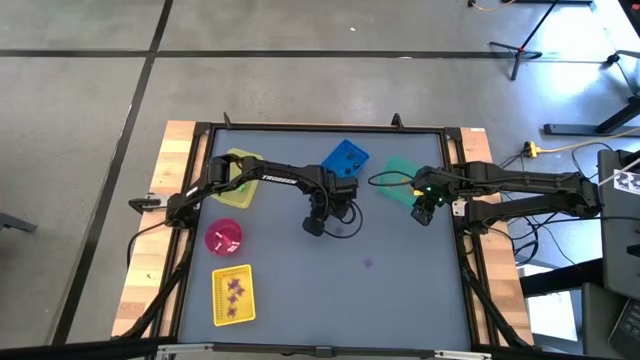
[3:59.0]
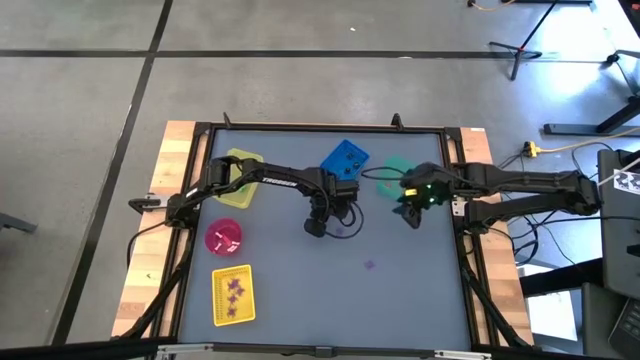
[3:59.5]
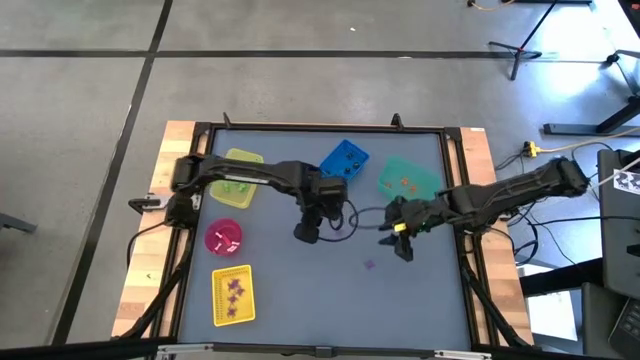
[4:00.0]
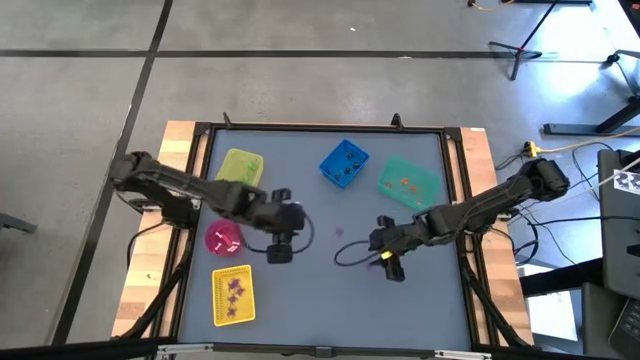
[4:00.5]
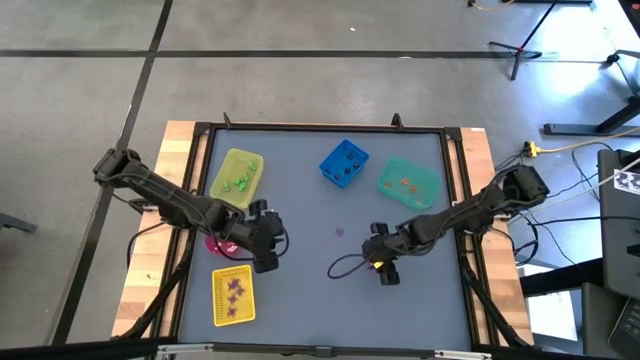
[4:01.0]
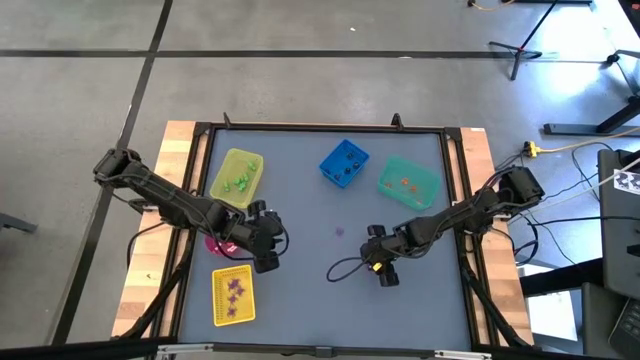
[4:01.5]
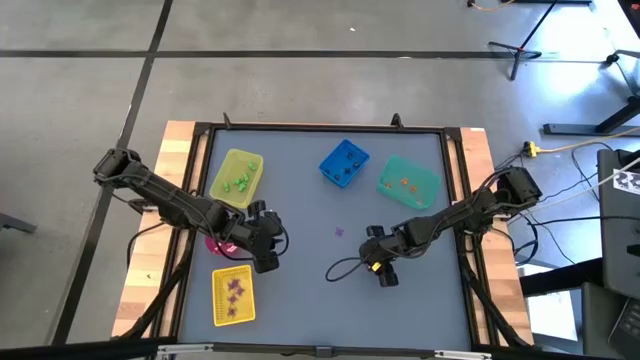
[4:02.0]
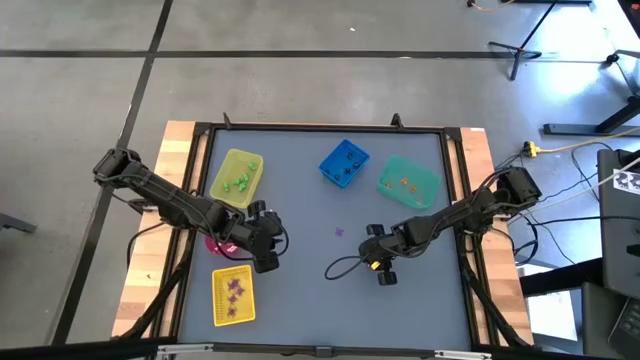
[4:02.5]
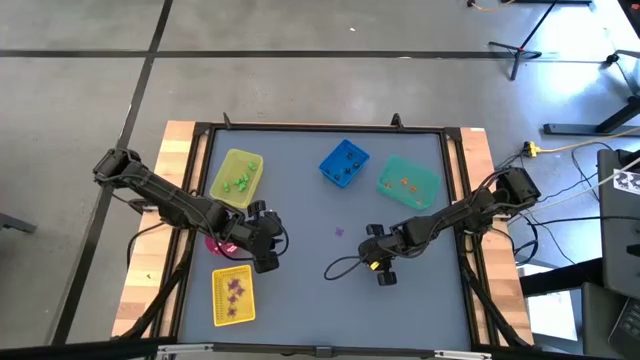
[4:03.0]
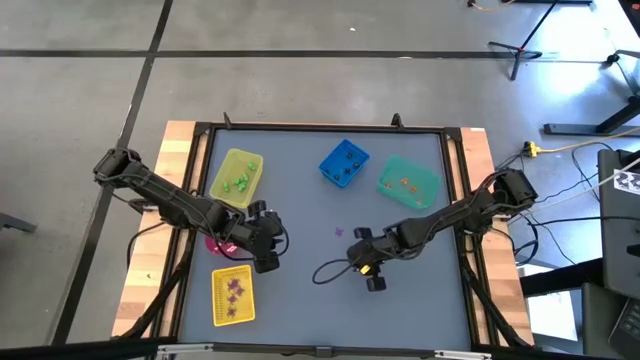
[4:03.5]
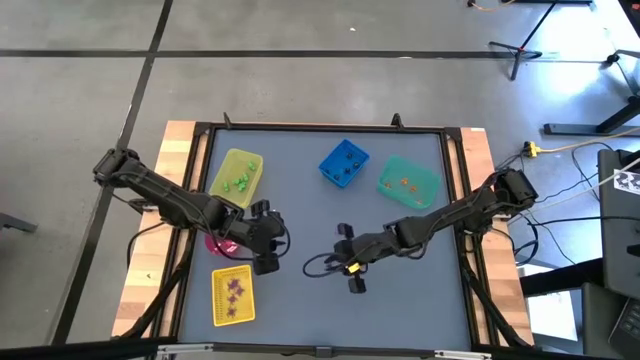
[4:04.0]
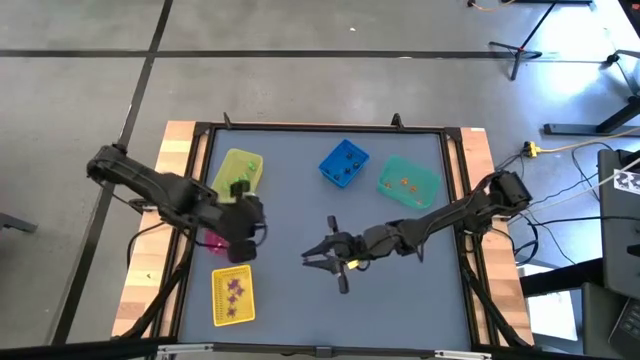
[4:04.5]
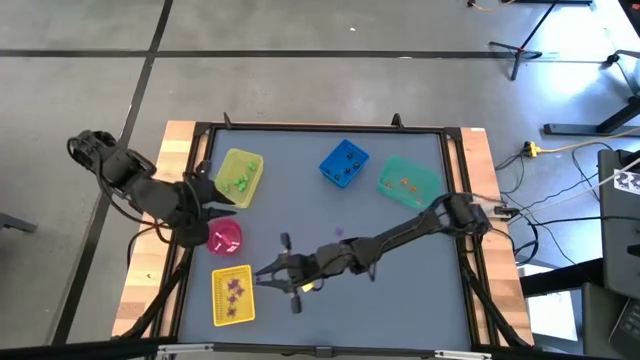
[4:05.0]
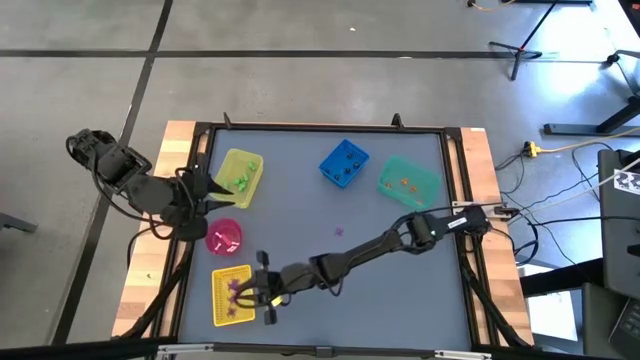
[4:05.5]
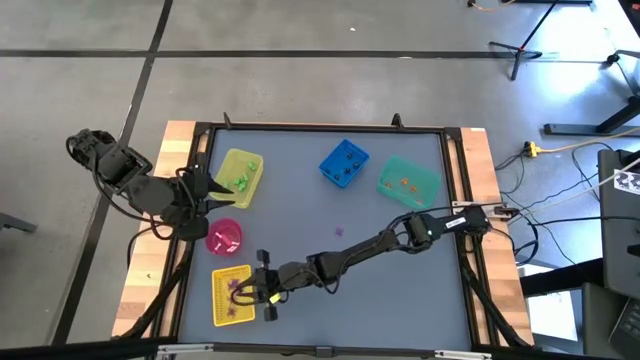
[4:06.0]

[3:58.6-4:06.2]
Task: Sort Halloween decoration
Put the purple spider toy into the yellow basket

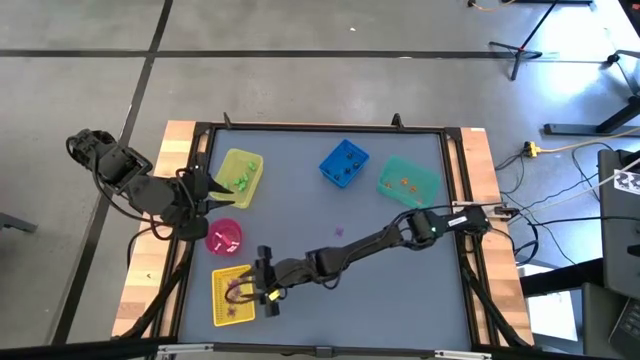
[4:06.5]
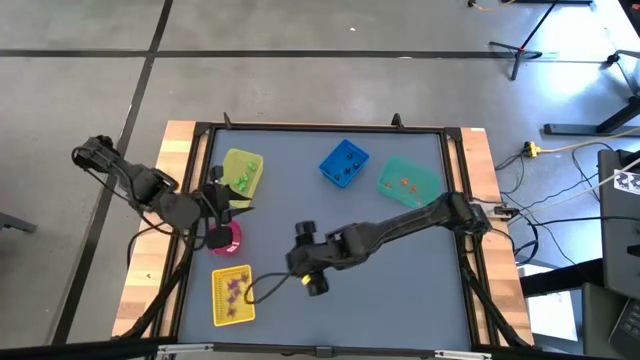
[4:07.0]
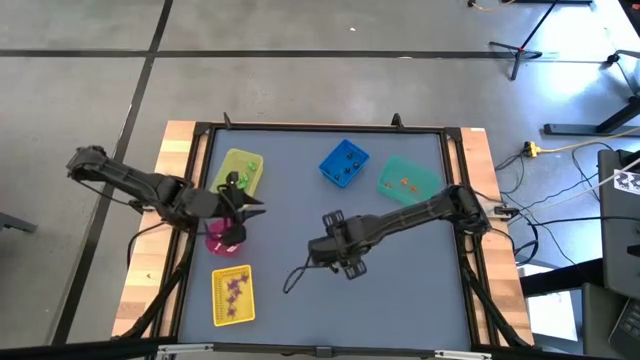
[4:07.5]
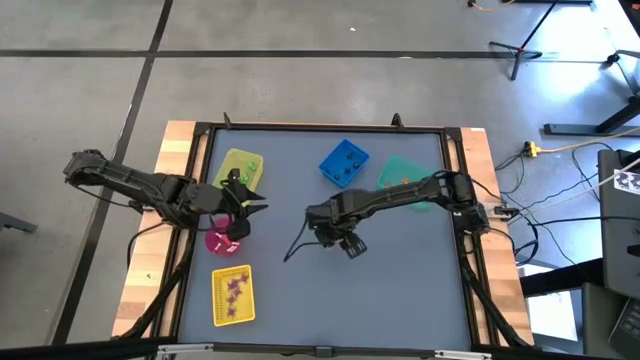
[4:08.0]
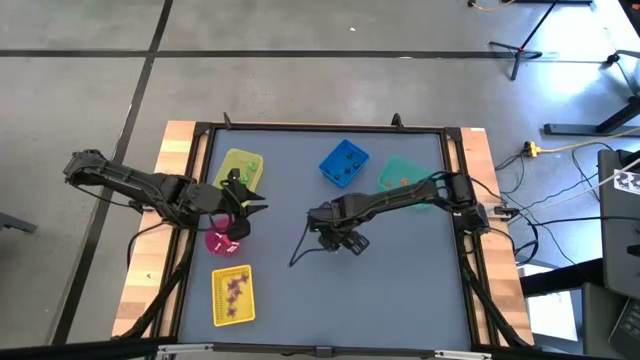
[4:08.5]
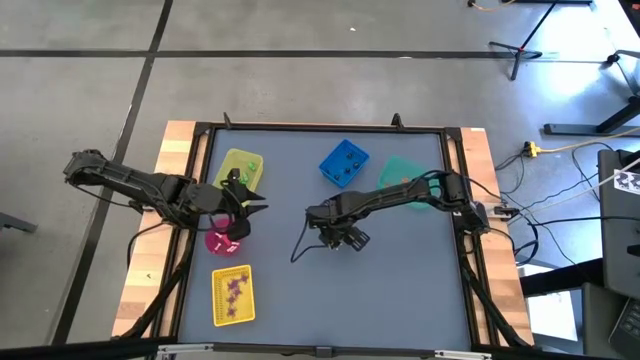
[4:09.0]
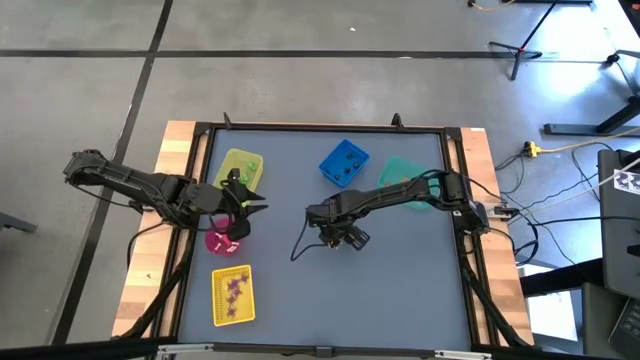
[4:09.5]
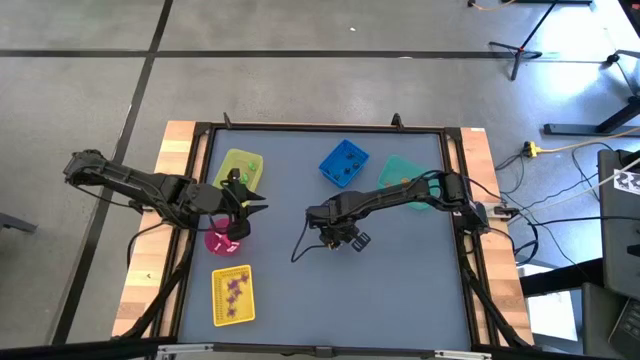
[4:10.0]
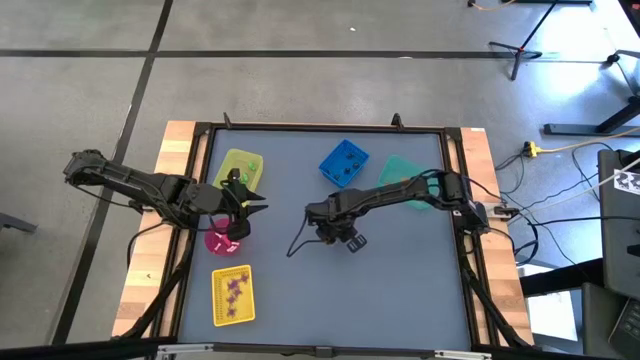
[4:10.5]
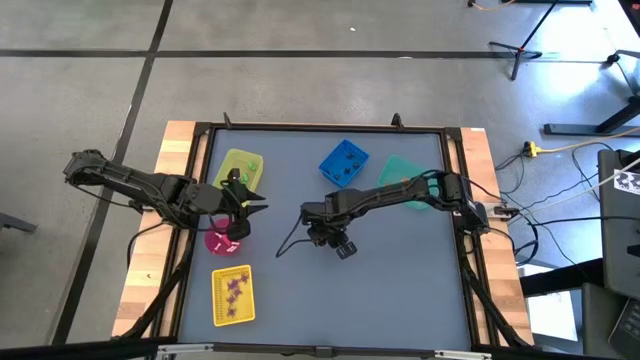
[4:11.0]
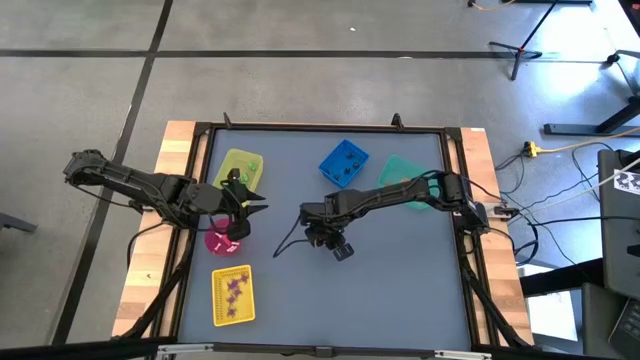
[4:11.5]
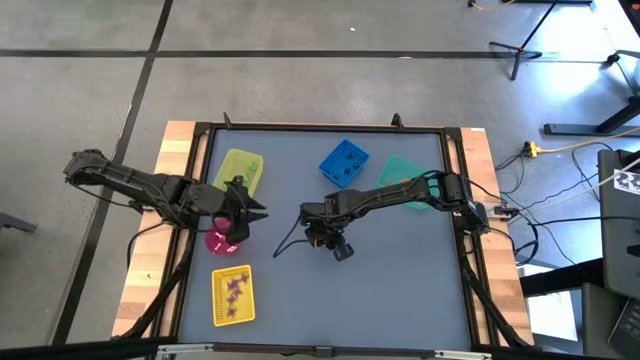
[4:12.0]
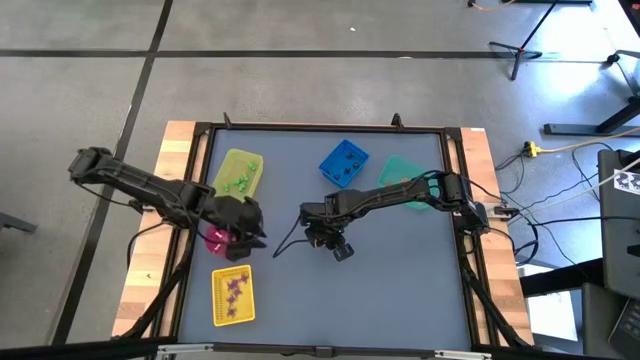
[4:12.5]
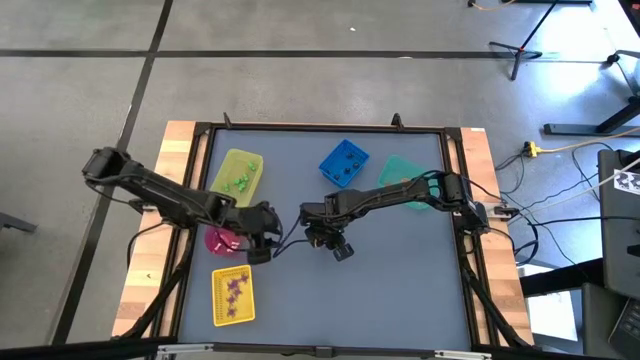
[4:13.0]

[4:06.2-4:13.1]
Put the purple spider toy into the yellow basket

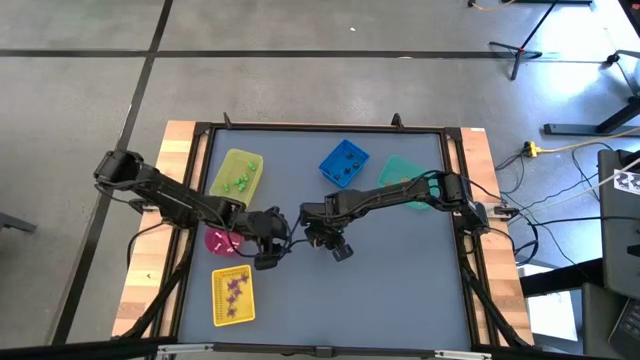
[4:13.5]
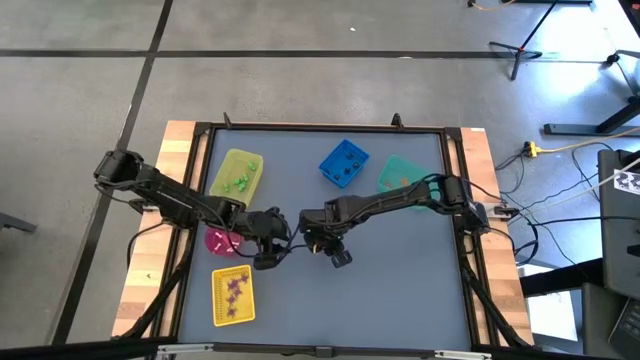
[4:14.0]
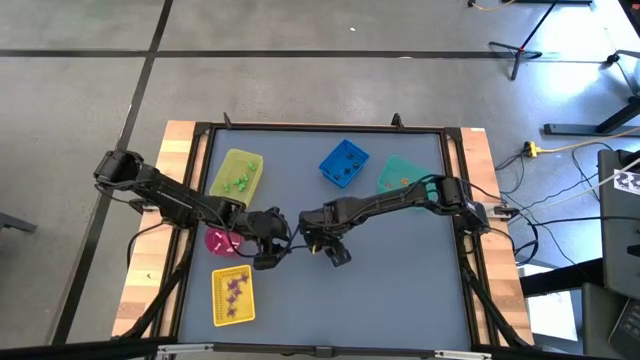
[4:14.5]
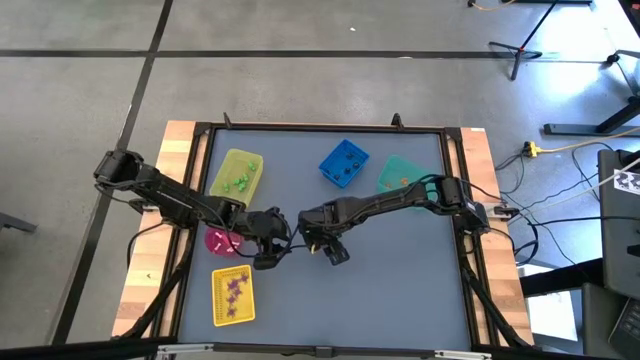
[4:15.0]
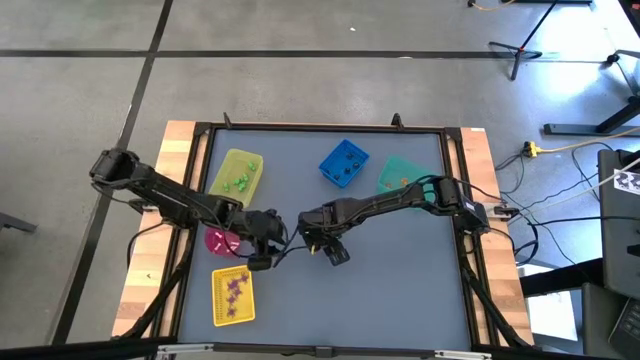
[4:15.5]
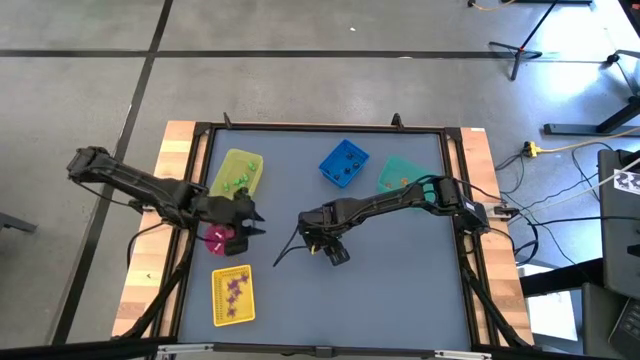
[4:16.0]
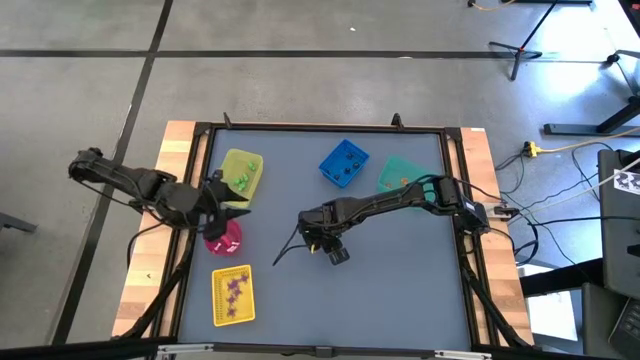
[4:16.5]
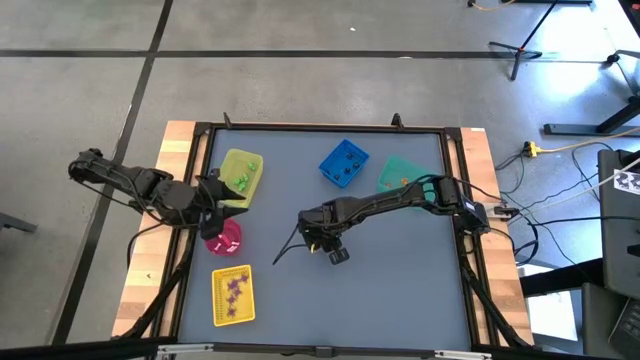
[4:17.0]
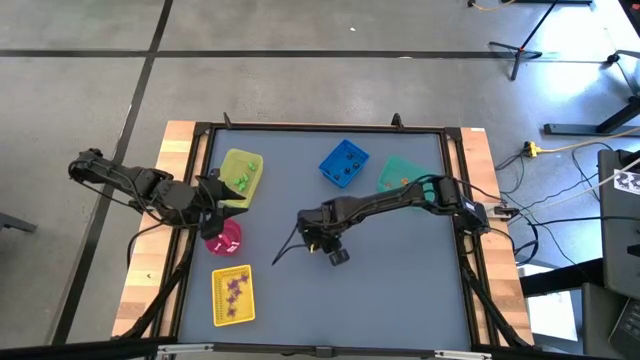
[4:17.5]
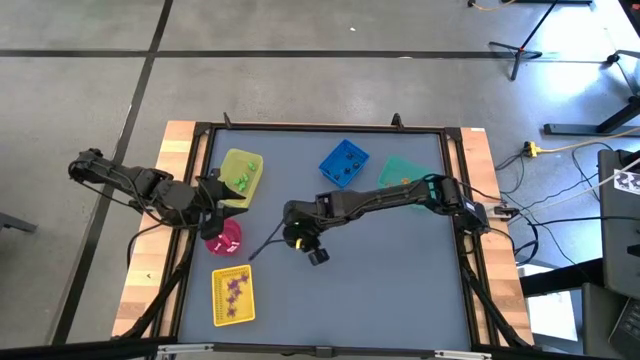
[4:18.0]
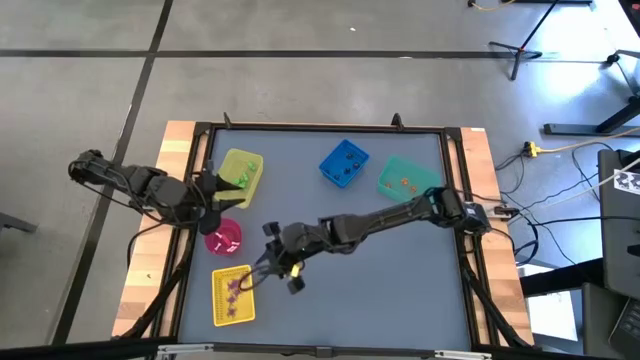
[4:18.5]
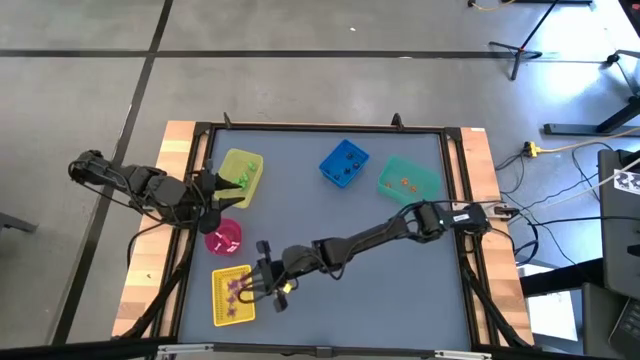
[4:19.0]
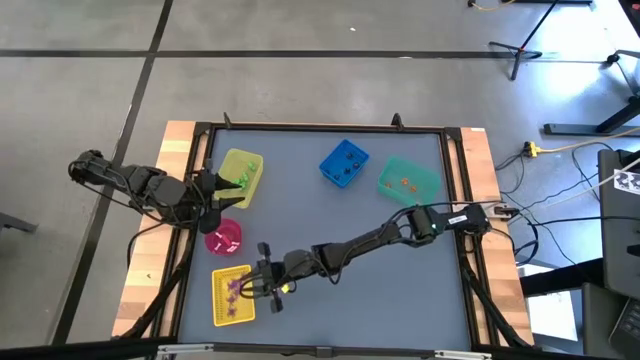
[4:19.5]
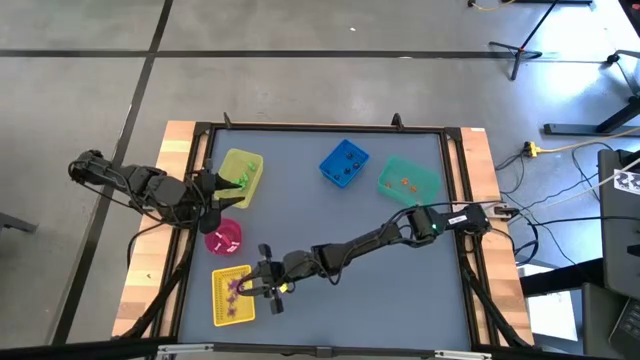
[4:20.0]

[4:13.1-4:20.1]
Put the purple spider toy into the yellow basket

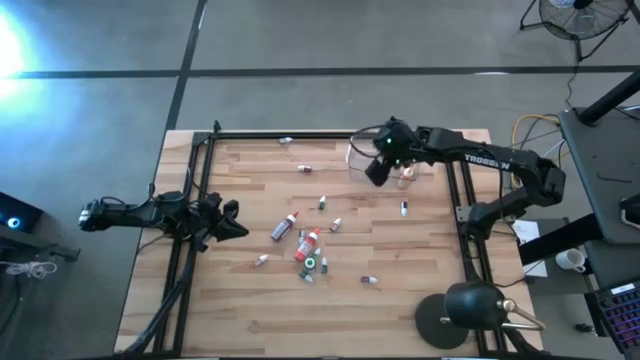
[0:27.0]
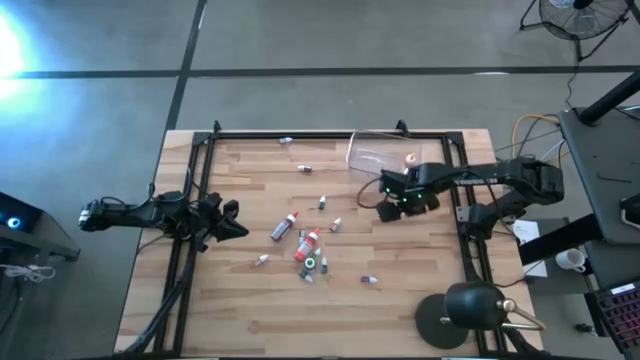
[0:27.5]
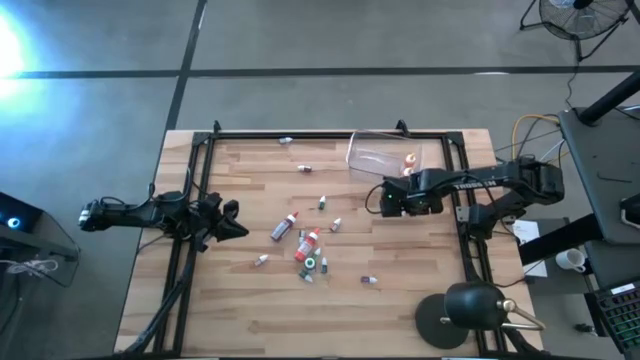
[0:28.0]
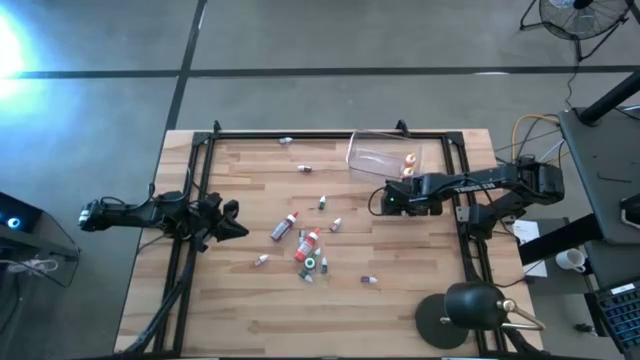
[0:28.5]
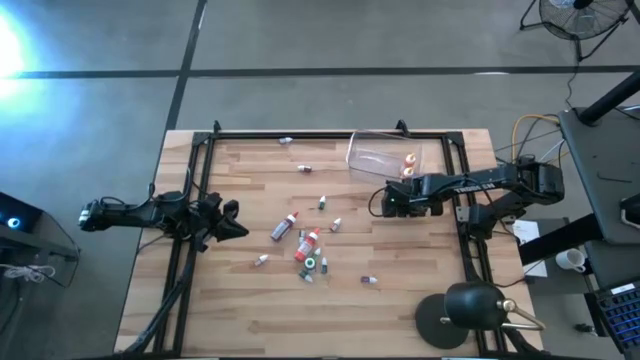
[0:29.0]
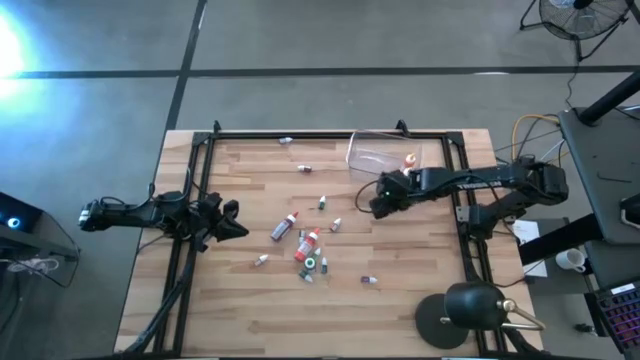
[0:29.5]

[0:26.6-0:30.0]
Task: Pick & Place food coloring
Put the small green food coloring bottle into the transparent bin
